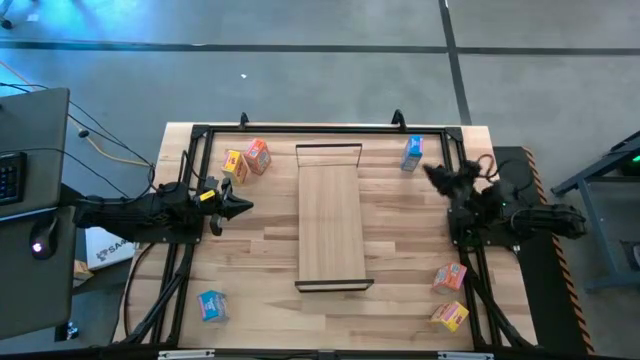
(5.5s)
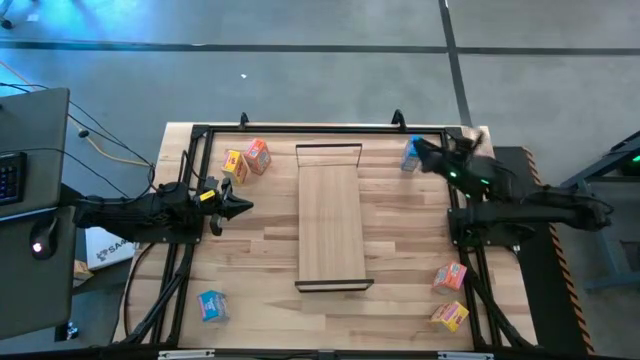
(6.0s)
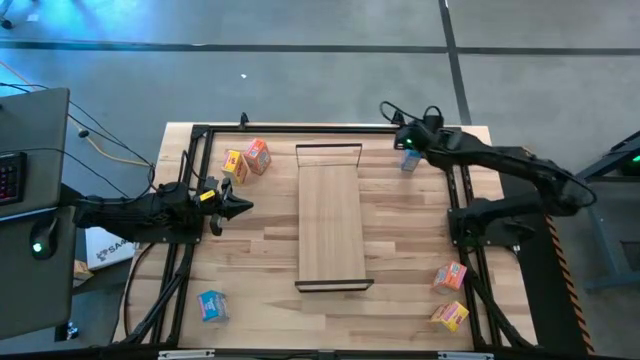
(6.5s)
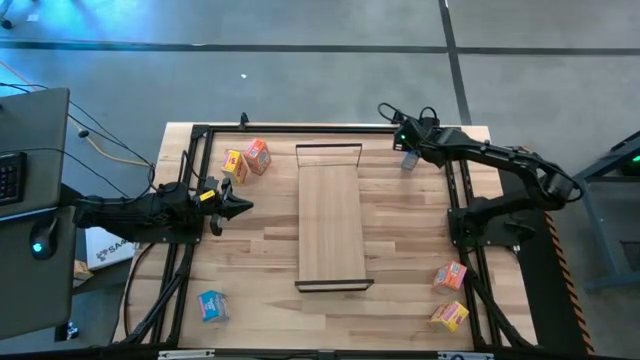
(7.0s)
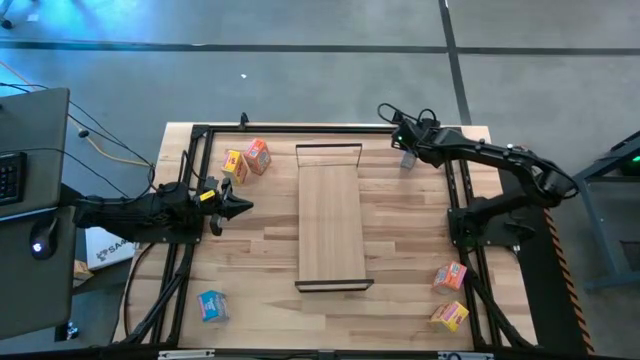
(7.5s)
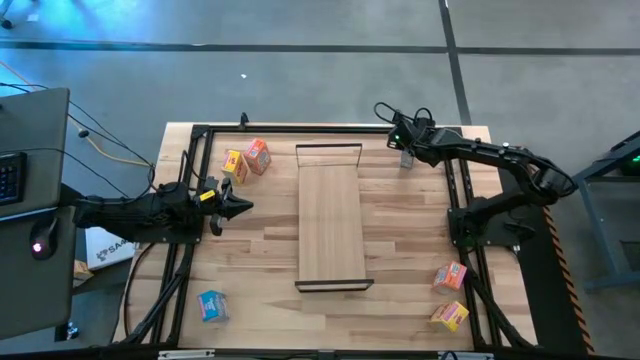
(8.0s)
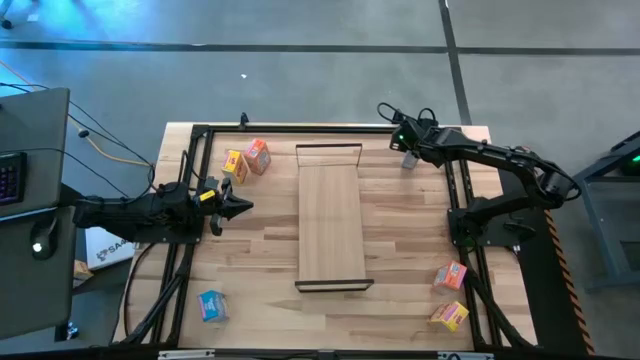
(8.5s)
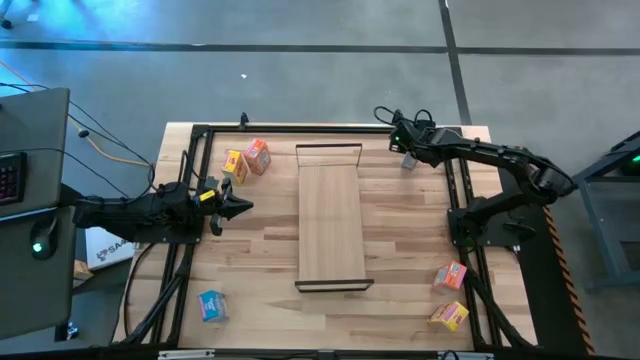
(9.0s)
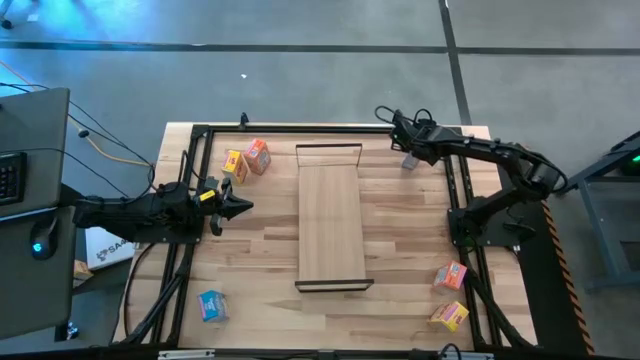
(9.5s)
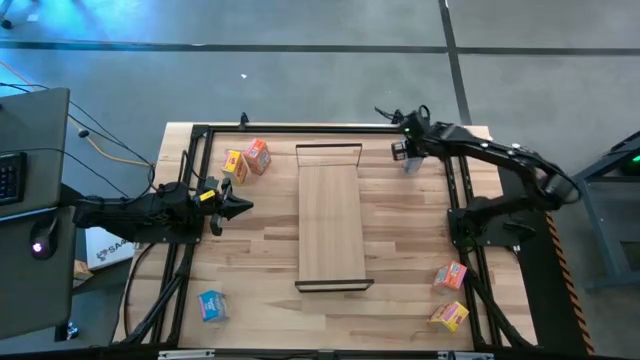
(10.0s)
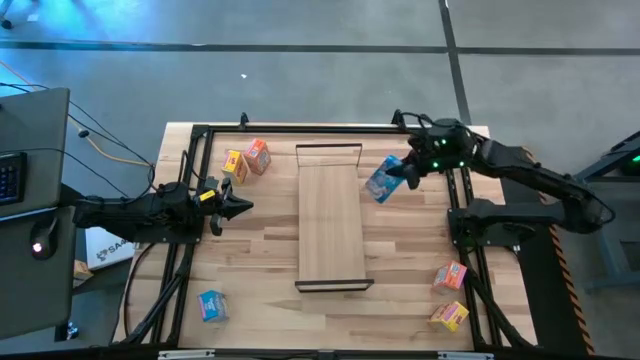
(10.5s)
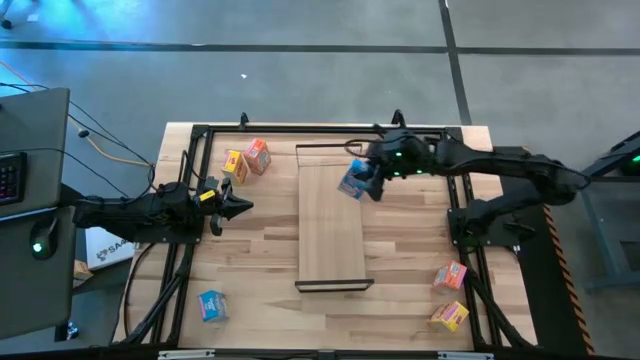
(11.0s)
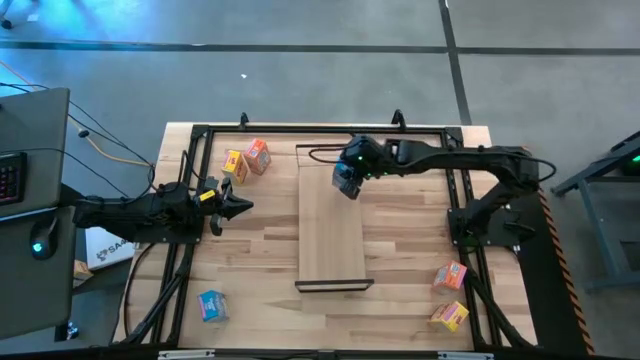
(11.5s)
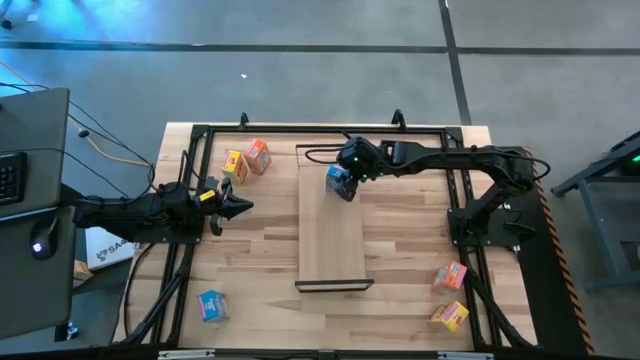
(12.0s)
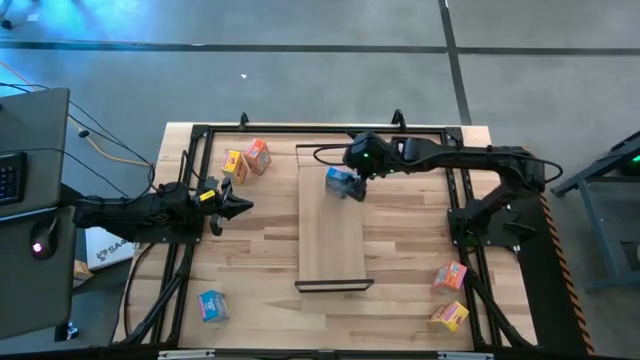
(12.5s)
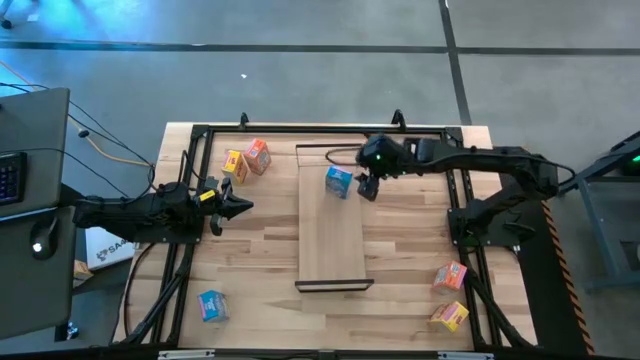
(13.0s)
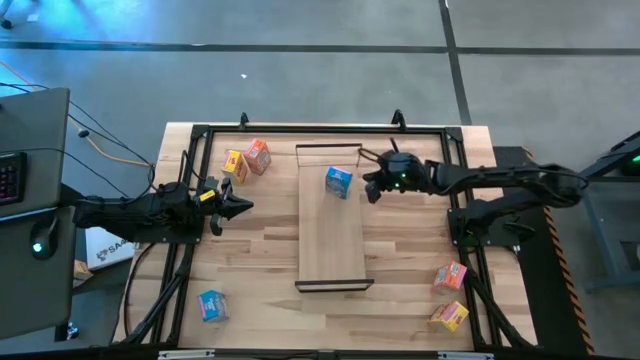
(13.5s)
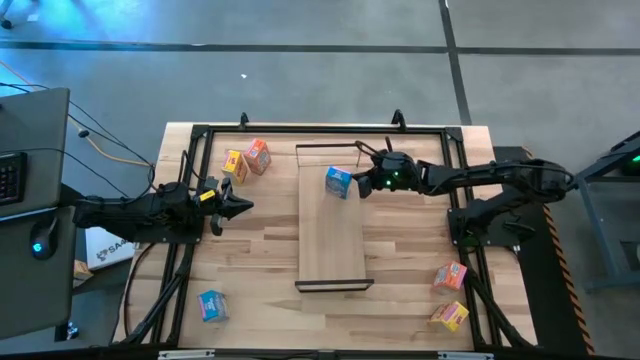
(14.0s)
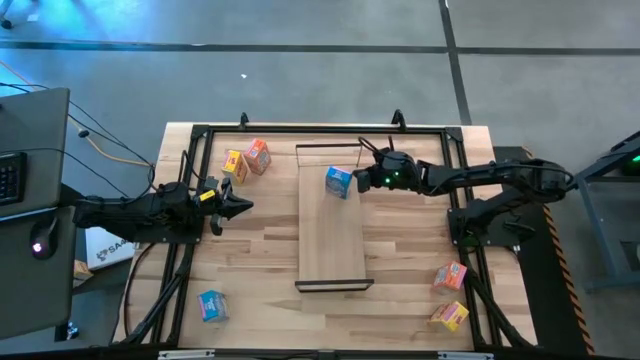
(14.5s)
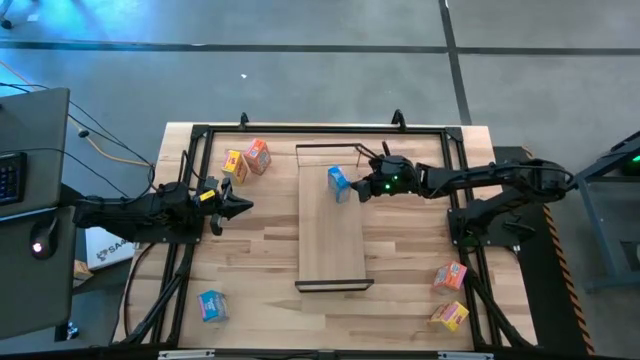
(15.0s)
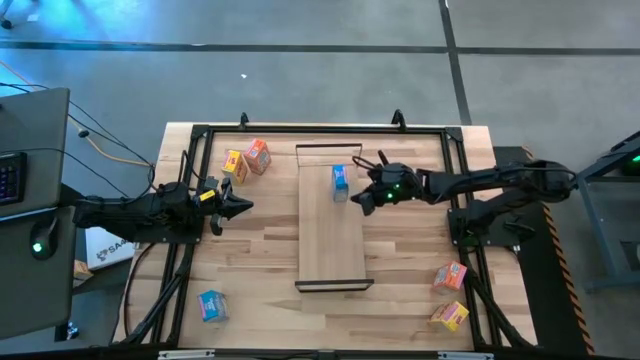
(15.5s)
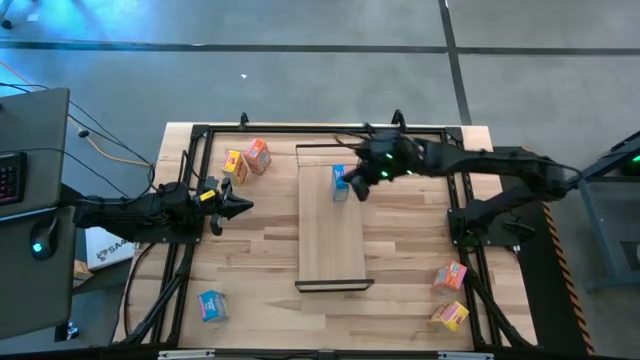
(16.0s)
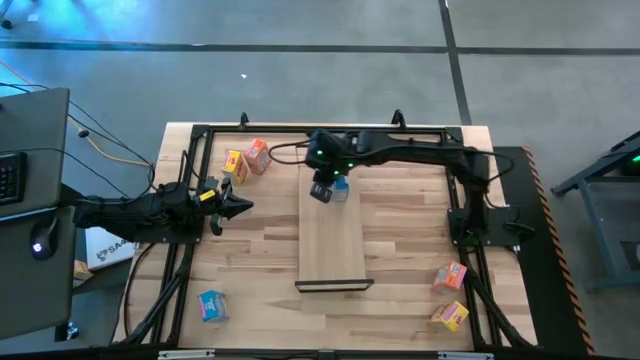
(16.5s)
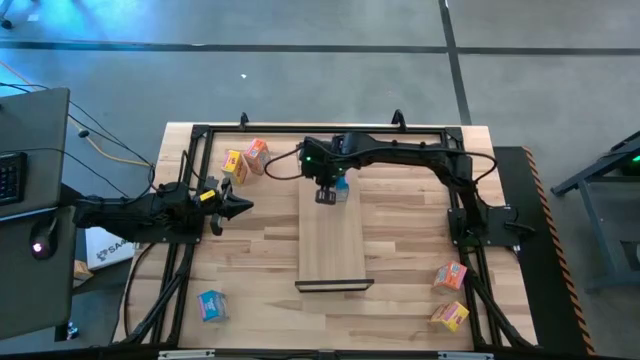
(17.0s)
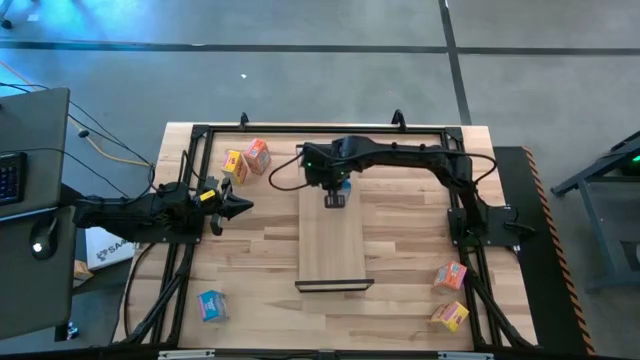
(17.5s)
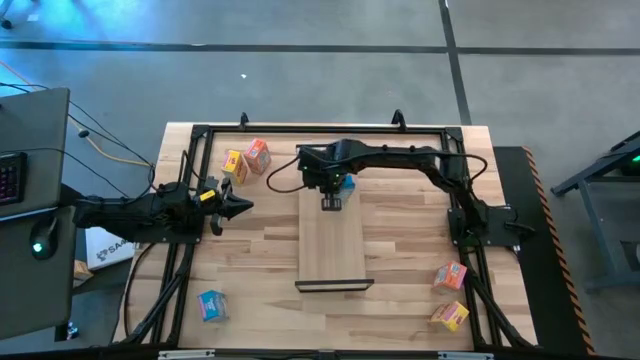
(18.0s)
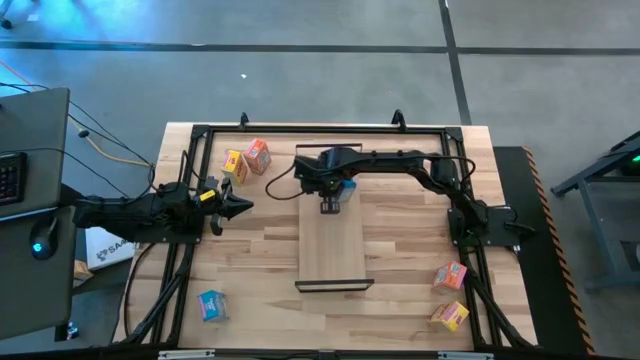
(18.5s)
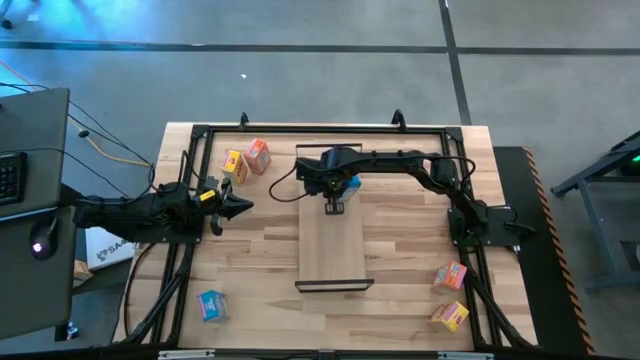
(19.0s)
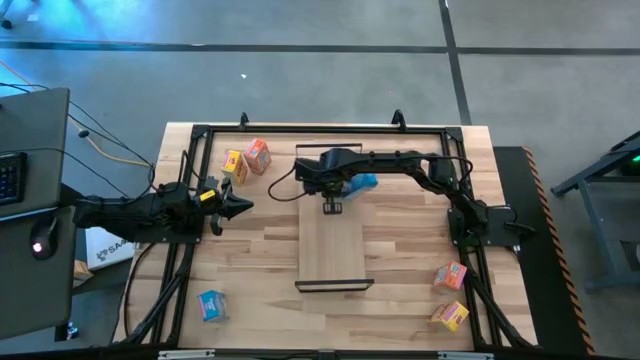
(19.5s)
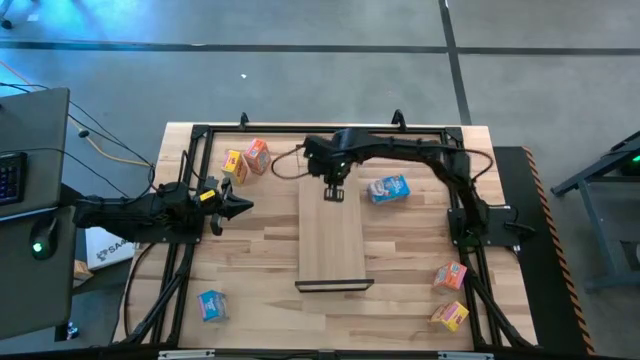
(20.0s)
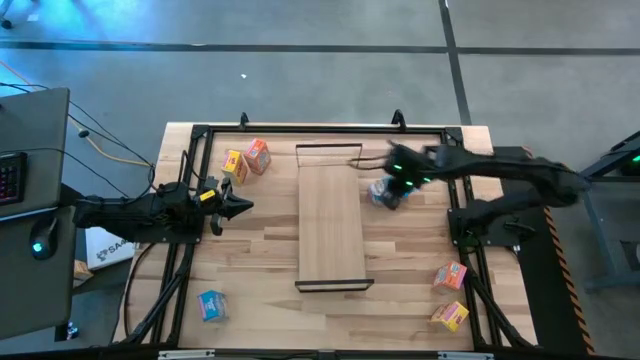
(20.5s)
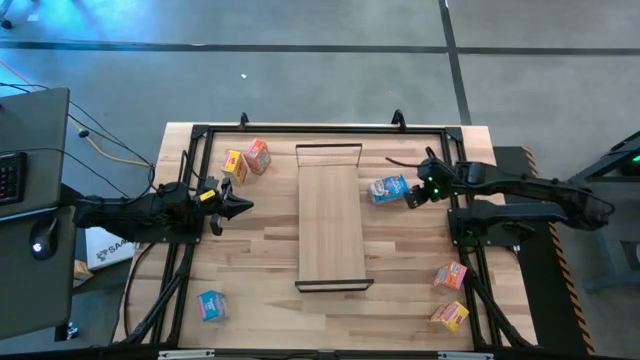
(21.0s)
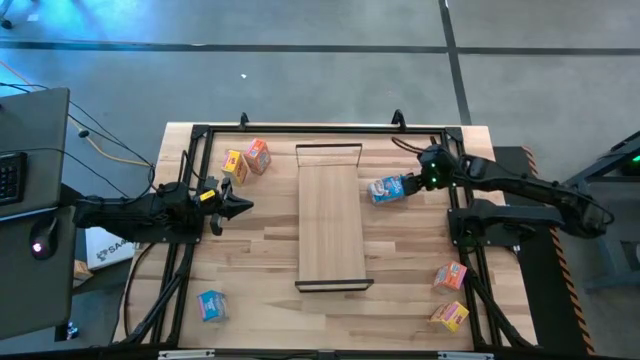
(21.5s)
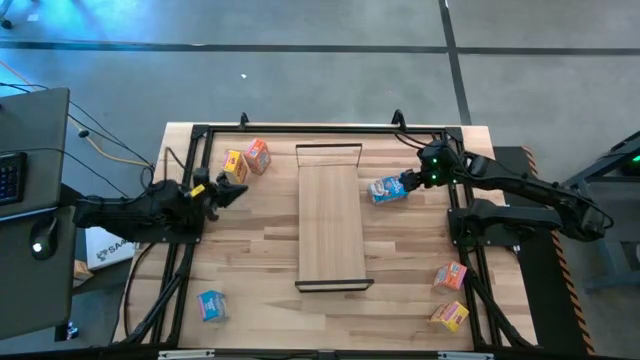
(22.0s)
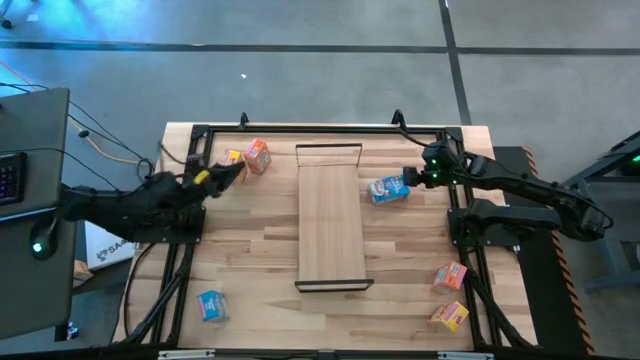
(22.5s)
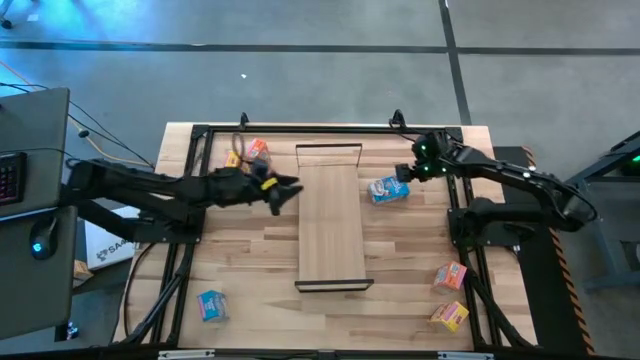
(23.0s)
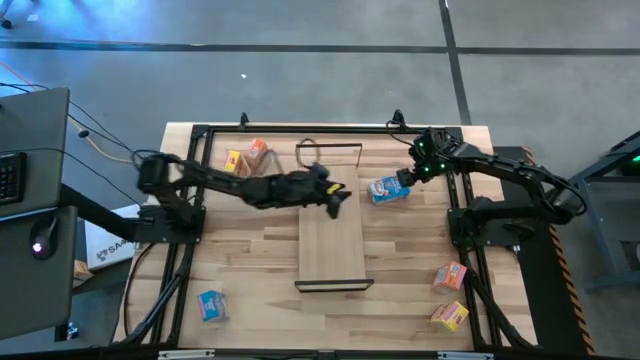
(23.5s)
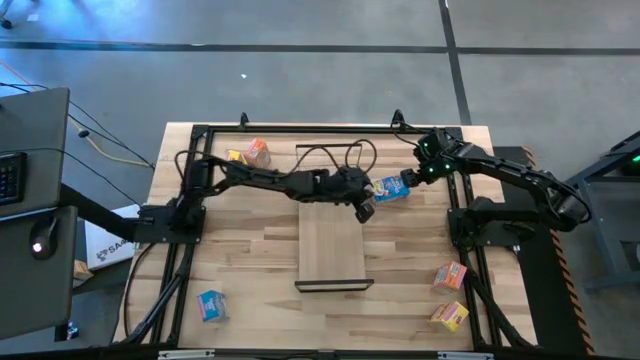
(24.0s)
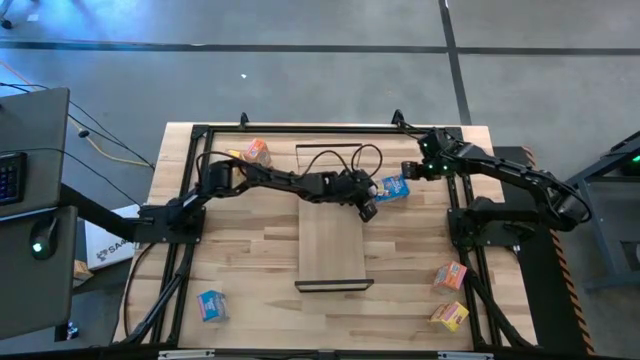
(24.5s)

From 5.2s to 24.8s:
Task: Stack cereal on shelf
Put the top blue cereal box on the shelf
